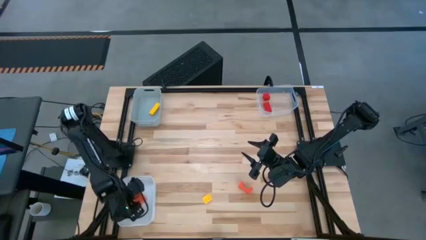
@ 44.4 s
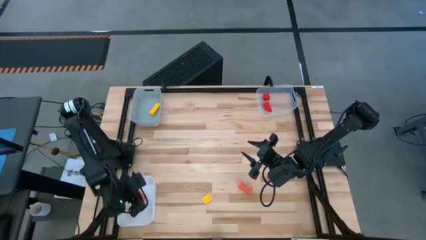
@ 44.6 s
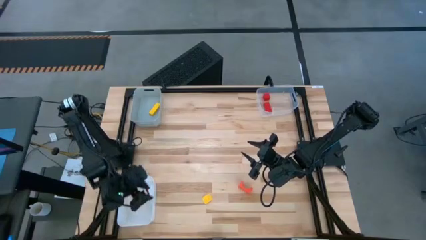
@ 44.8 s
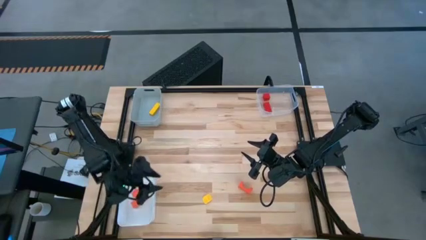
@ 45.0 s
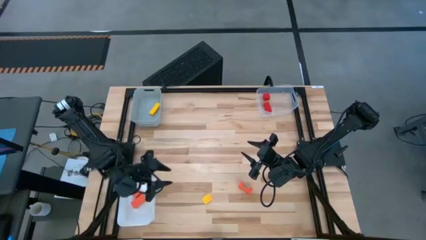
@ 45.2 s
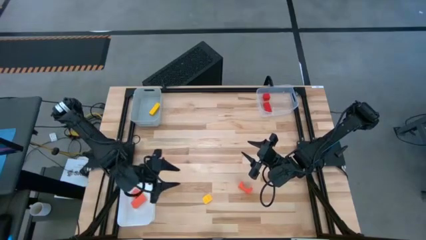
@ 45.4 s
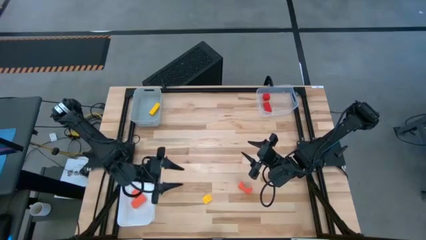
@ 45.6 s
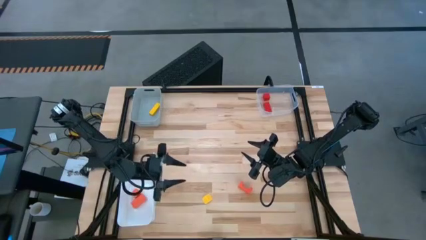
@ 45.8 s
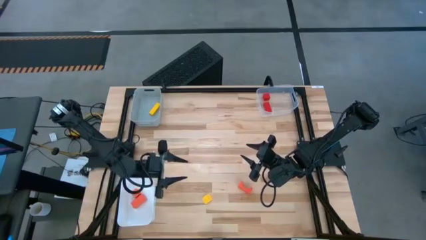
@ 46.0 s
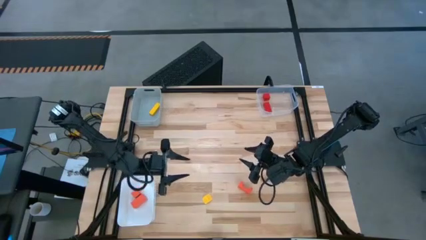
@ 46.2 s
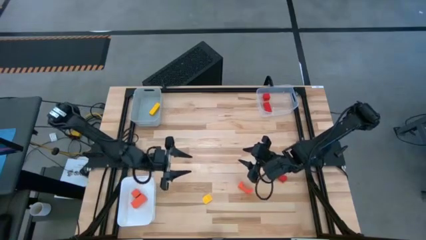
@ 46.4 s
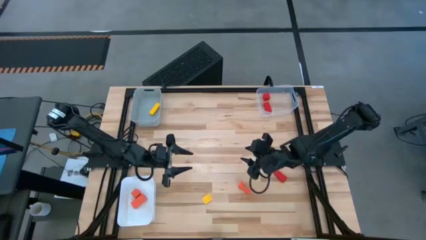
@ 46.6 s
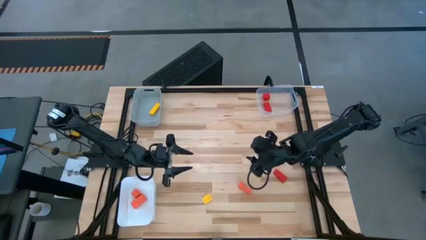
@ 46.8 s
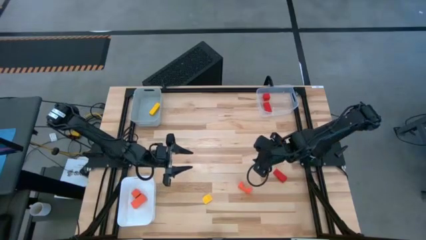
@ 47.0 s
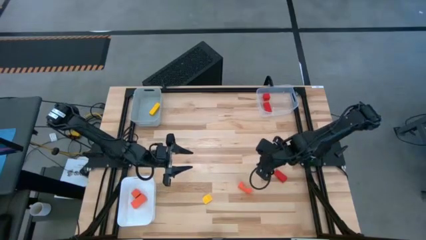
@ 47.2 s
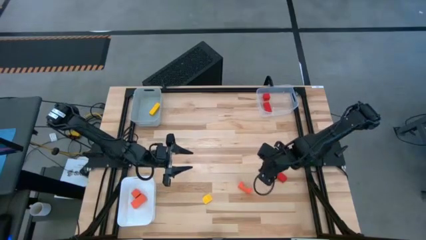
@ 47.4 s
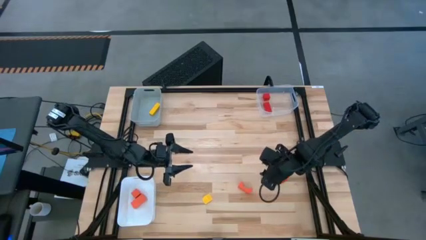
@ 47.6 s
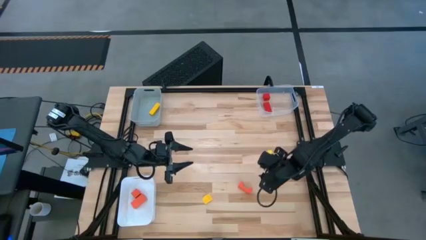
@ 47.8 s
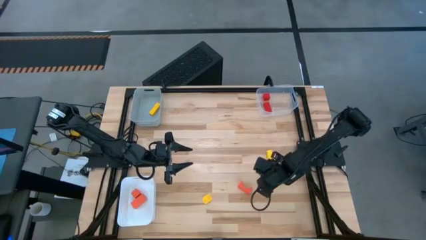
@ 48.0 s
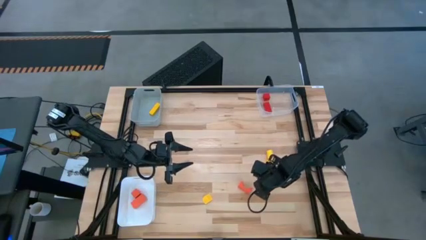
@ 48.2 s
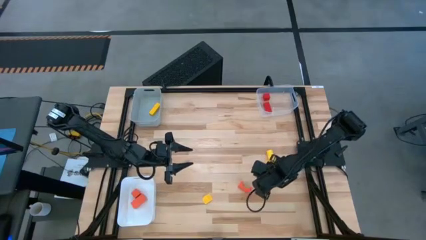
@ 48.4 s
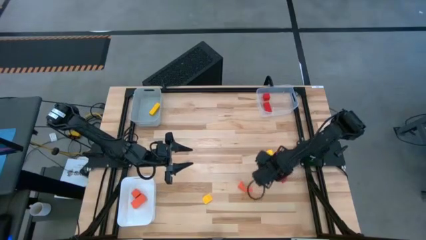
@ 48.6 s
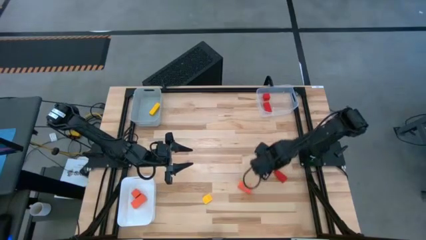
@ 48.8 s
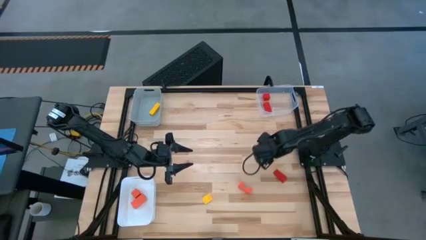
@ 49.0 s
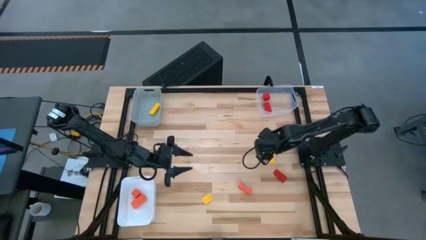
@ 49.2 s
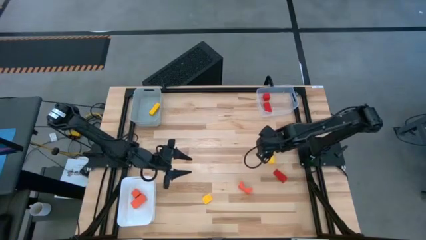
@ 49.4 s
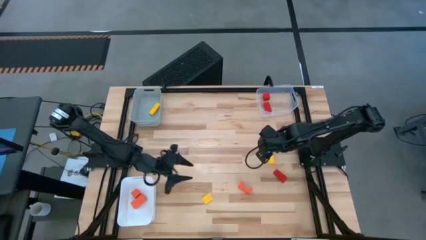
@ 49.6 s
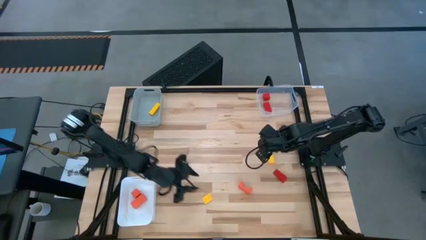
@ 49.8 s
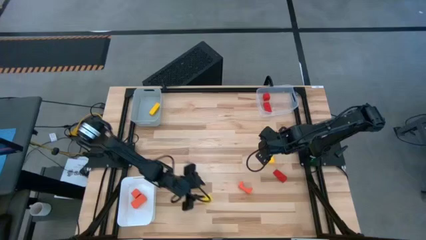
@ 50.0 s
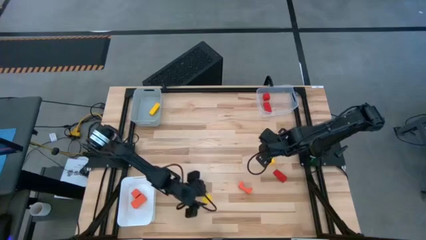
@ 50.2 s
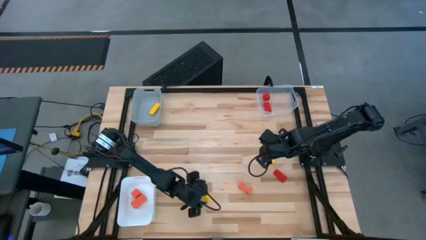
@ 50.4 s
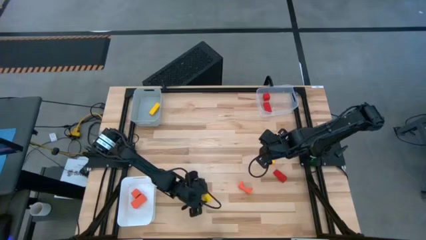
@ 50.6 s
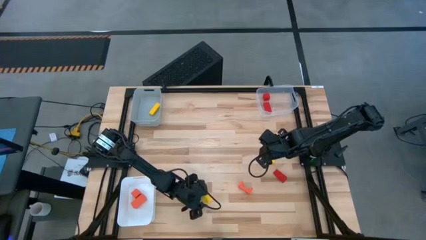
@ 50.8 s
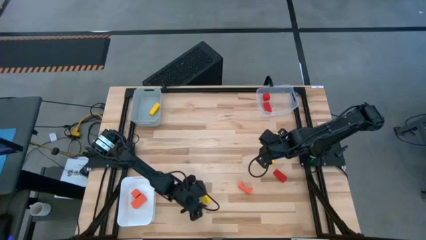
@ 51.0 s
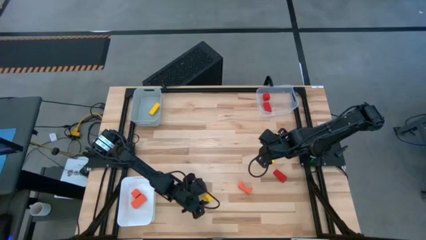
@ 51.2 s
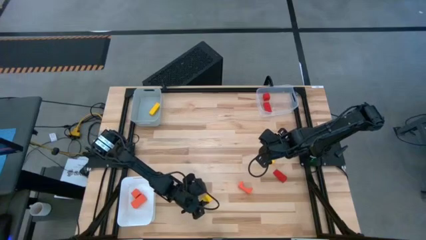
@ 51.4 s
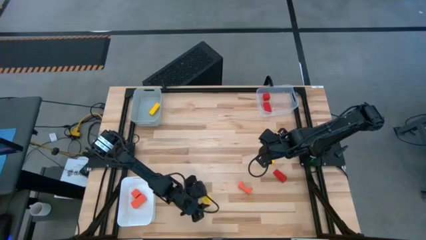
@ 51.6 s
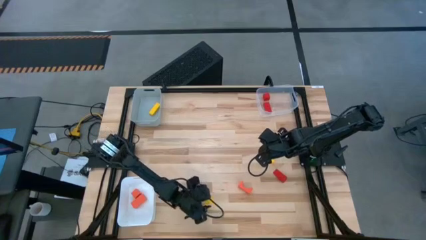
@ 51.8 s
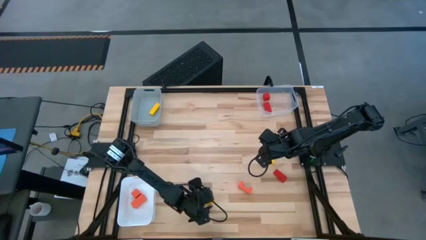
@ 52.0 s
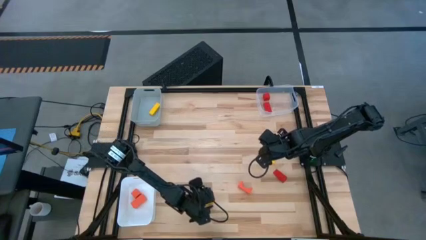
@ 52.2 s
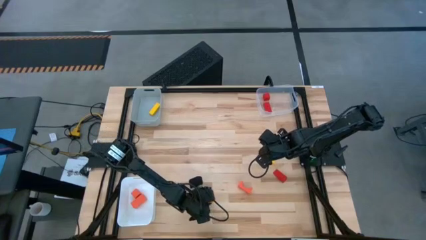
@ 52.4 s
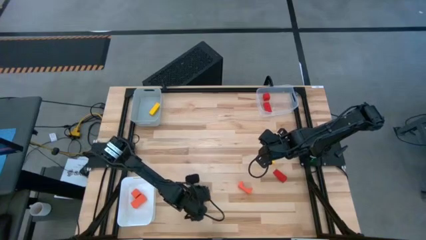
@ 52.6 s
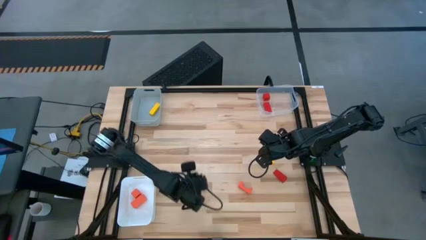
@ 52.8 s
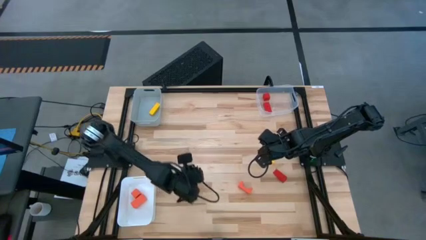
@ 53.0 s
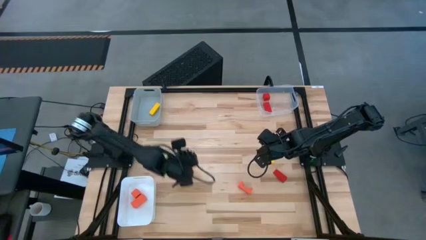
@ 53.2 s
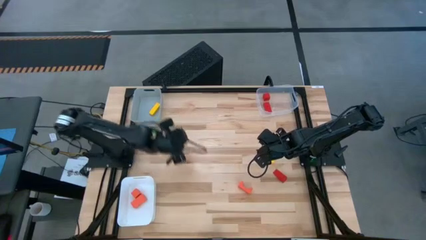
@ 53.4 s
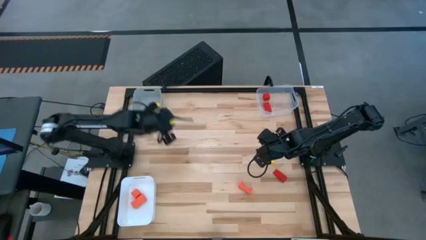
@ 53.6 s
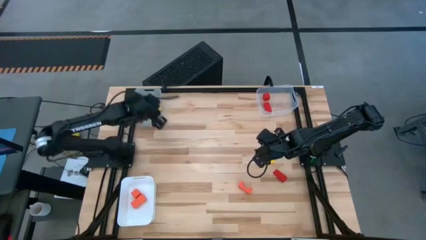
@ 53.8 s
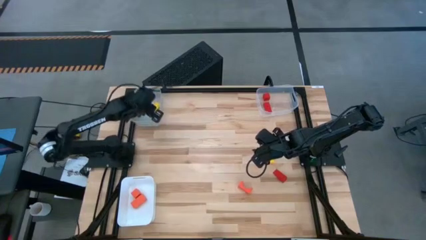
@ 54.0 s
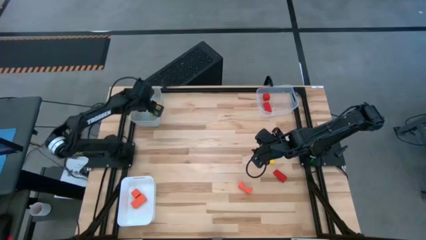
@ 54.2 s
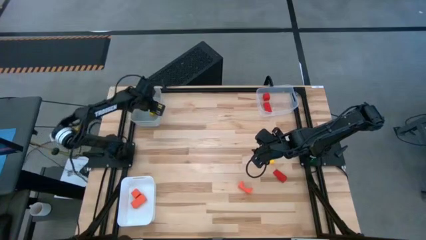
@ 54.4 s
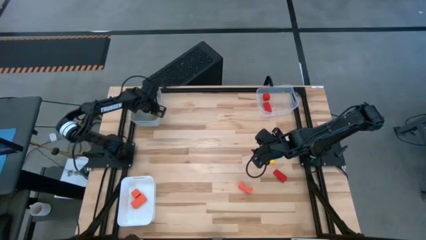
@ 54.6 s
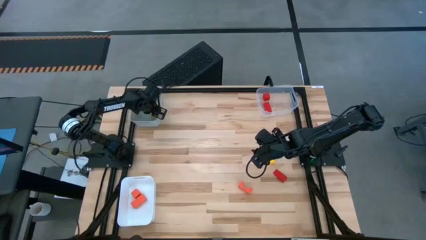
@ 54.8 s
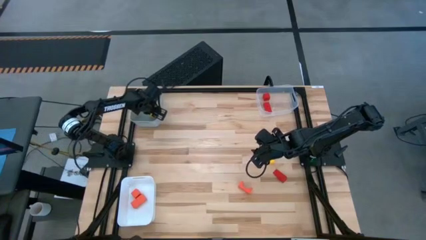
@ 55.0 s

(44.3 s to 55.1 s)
Task: Sort & place blocks by color
Put the bottom yellow block into the gray bin

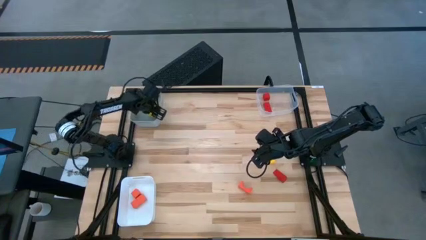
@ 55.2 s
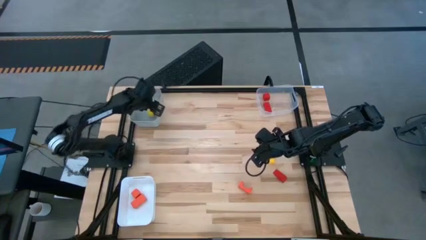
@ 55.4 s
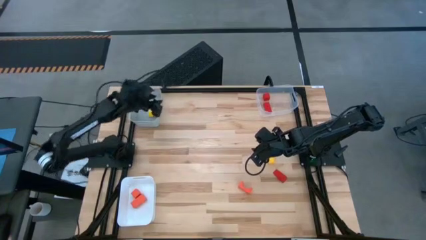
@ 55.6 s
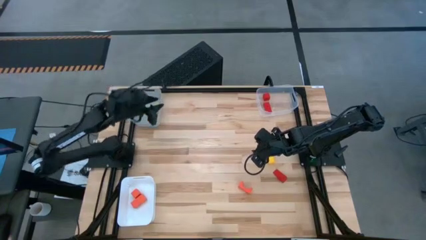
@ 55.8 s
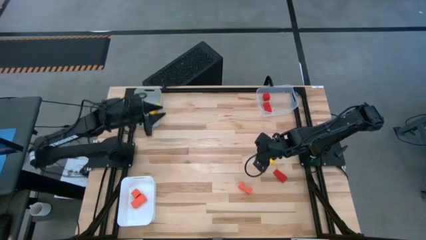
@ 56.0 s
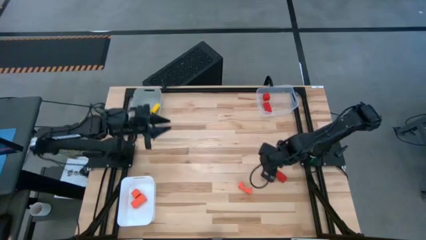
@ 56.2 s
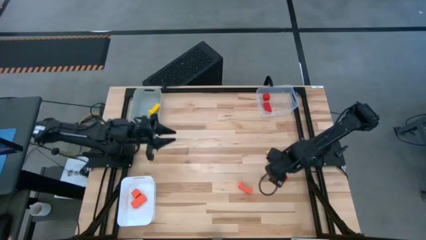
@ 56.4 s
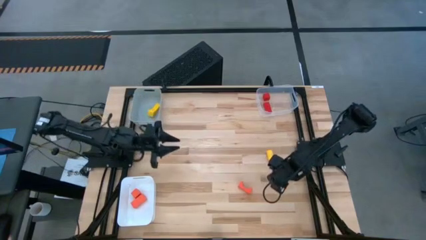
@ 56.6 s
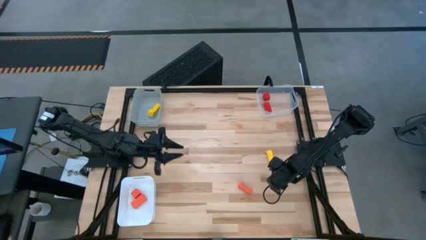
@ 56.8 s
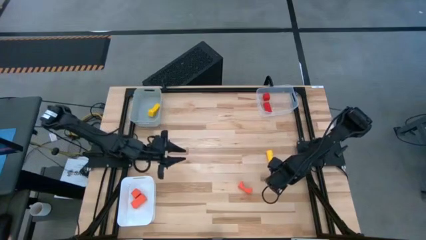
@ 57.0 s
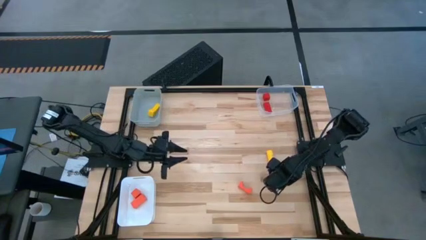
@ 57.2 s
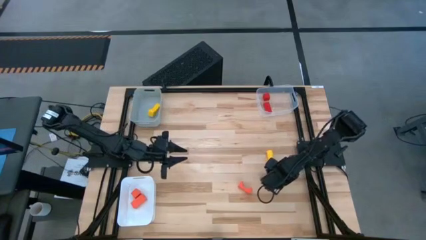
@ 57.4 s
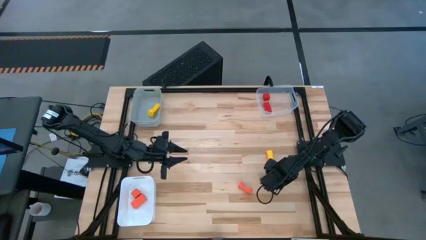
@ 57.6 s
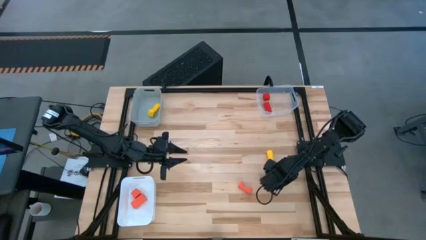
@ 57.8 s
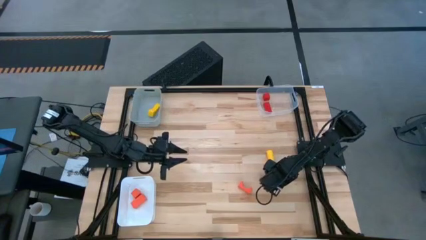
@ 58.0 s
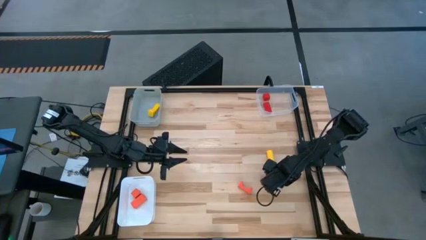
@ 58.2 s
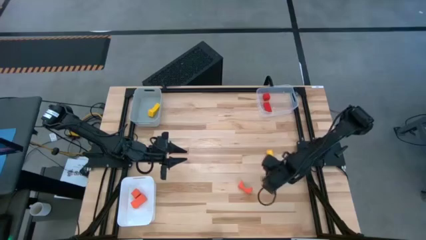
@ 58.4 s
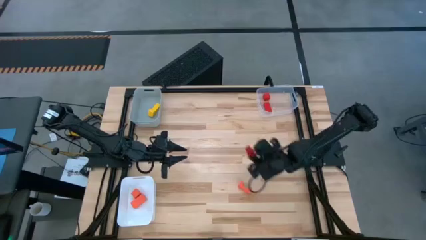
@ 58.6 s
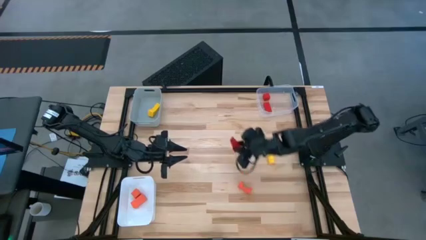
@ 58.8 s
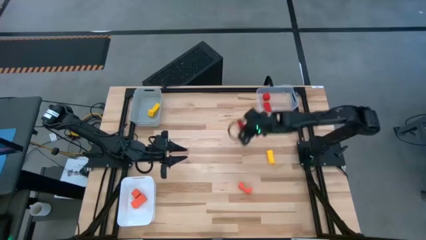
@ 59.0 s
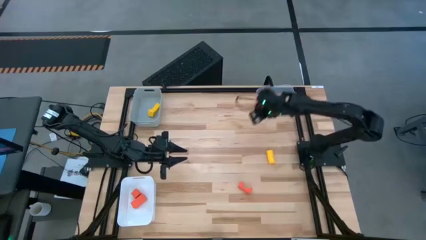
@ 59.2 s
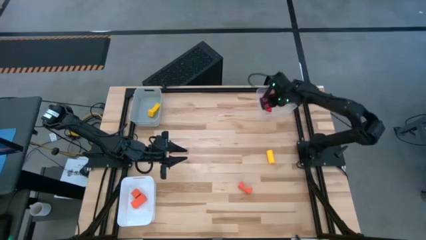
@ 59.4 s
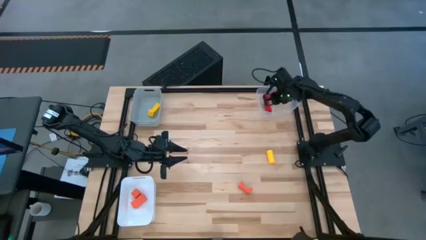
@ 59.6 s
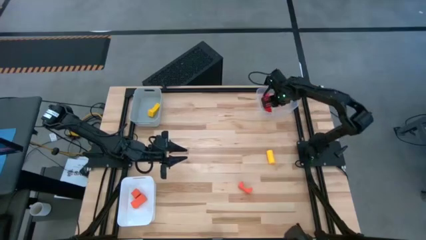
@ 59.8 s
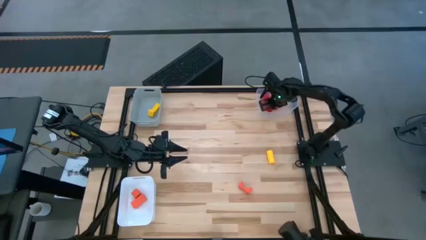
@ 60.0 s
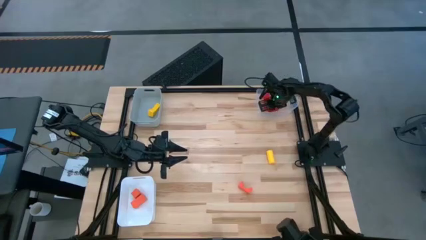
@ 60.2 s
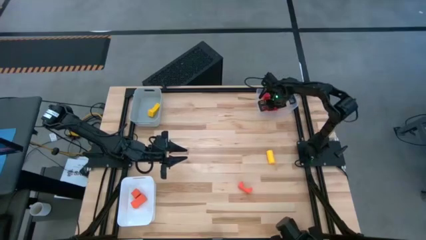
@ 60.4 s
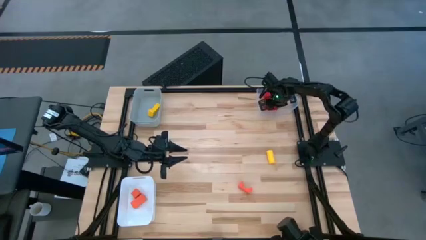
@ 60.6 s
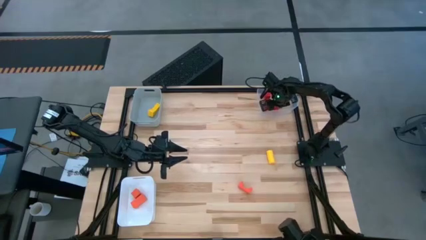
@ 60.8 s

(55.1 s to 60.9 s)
Put the red block into the transparent bin
